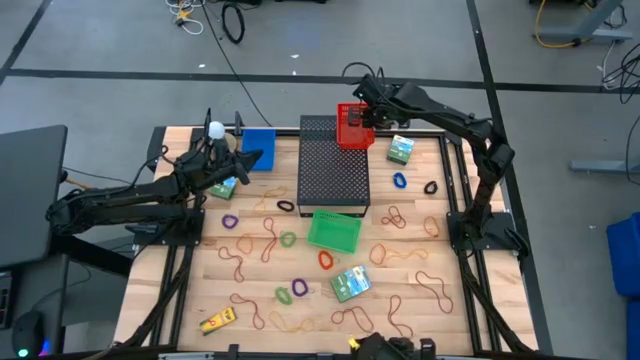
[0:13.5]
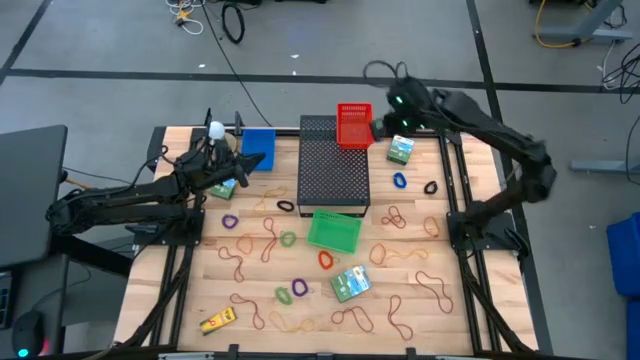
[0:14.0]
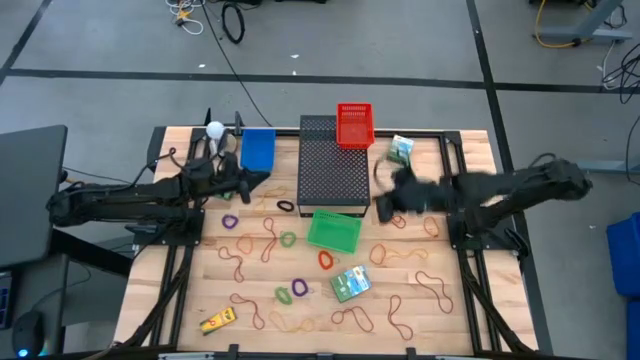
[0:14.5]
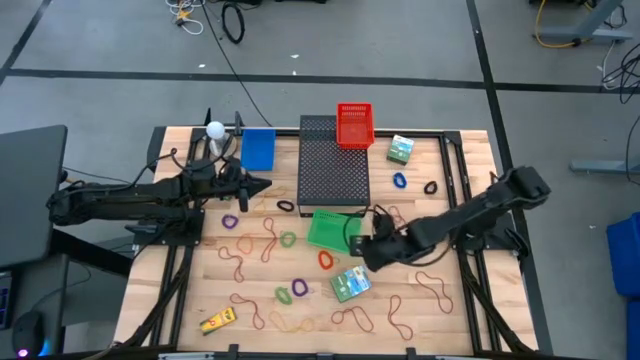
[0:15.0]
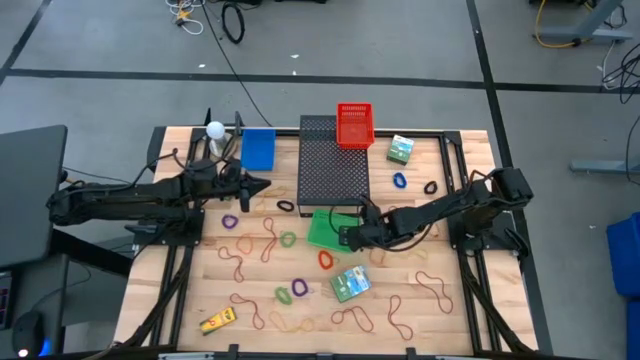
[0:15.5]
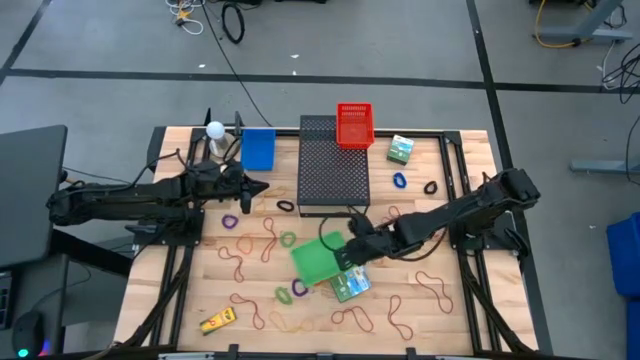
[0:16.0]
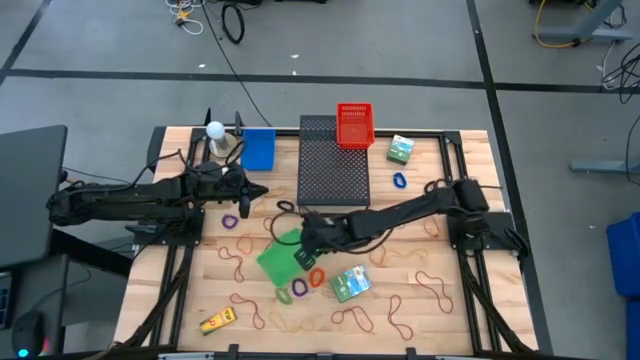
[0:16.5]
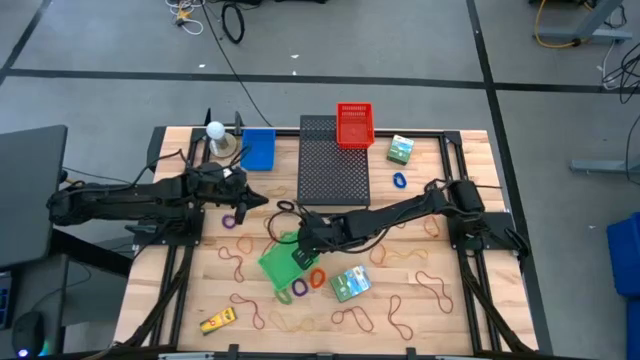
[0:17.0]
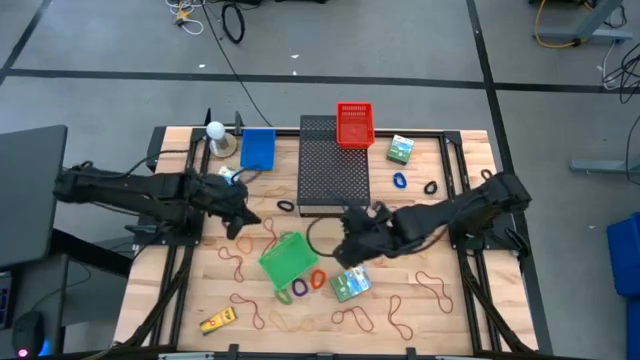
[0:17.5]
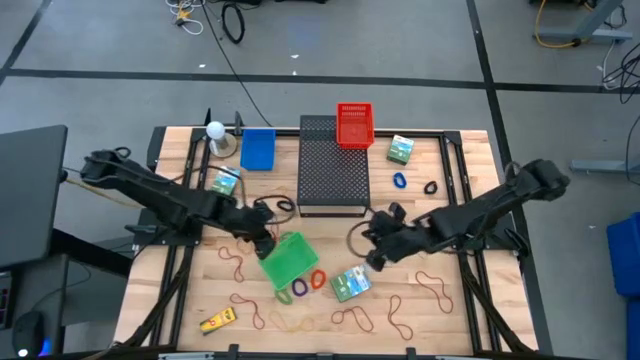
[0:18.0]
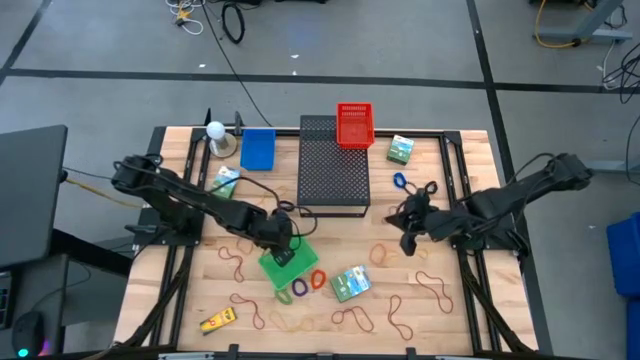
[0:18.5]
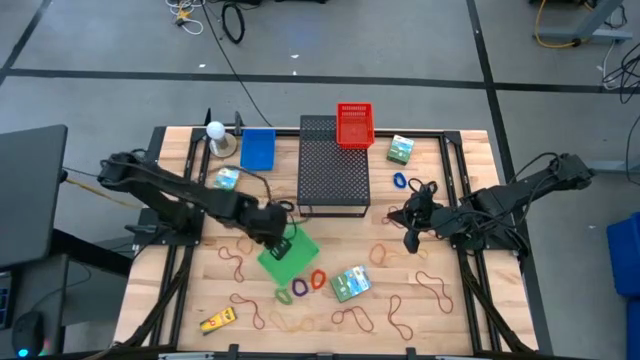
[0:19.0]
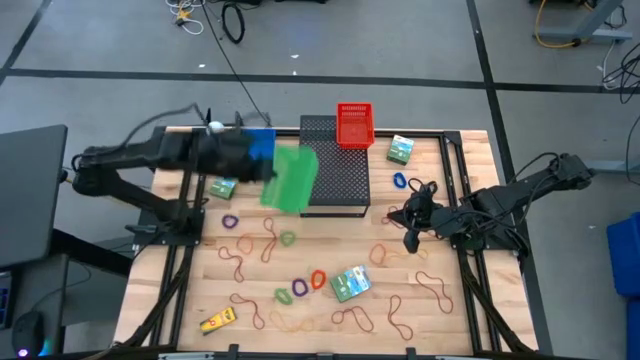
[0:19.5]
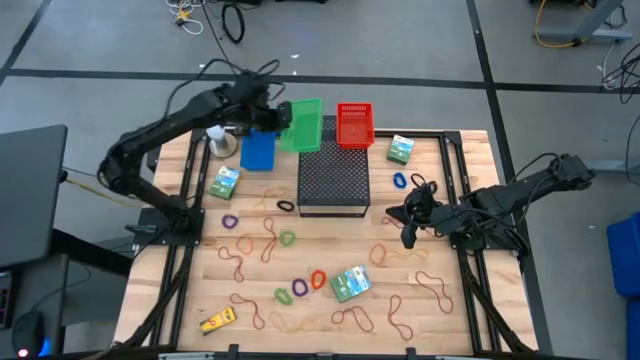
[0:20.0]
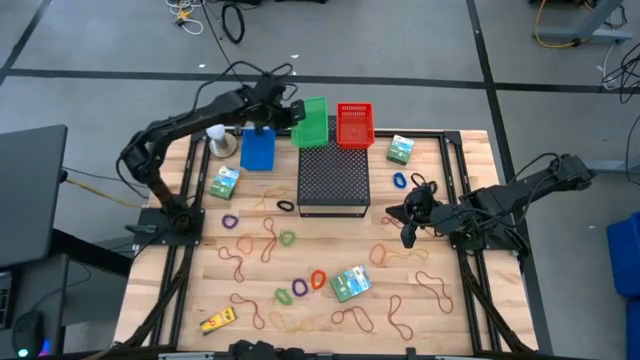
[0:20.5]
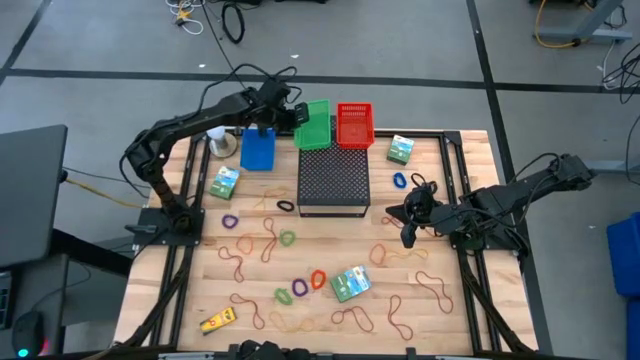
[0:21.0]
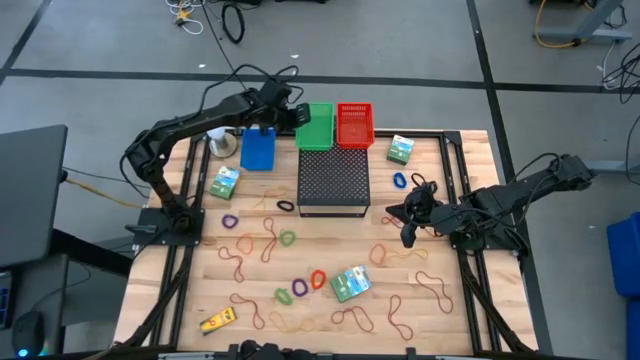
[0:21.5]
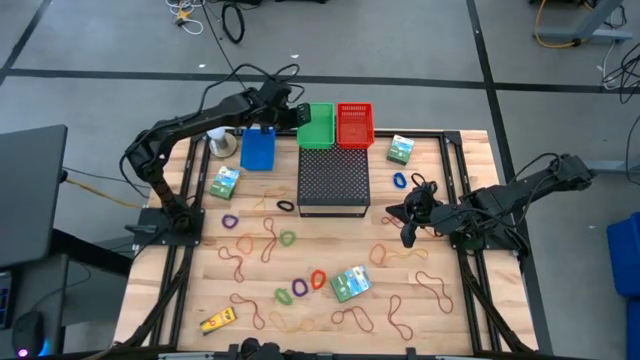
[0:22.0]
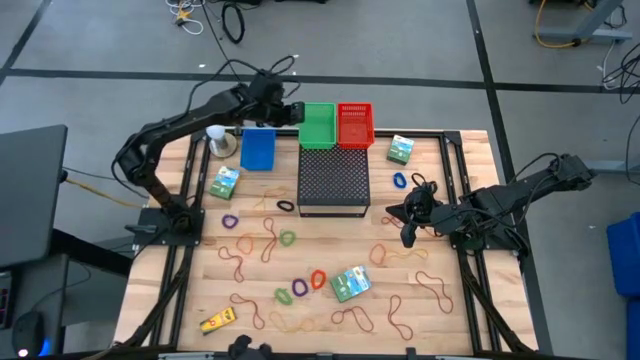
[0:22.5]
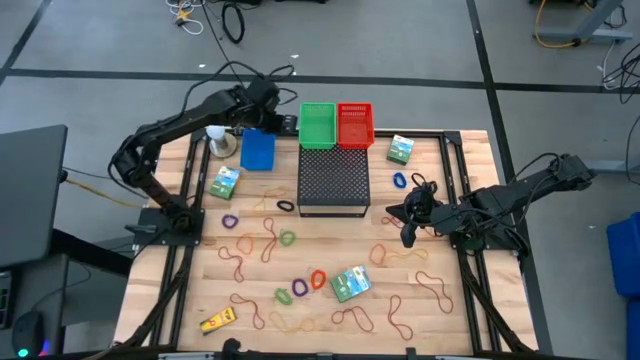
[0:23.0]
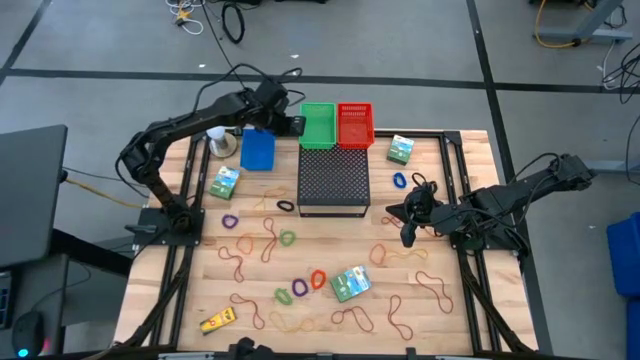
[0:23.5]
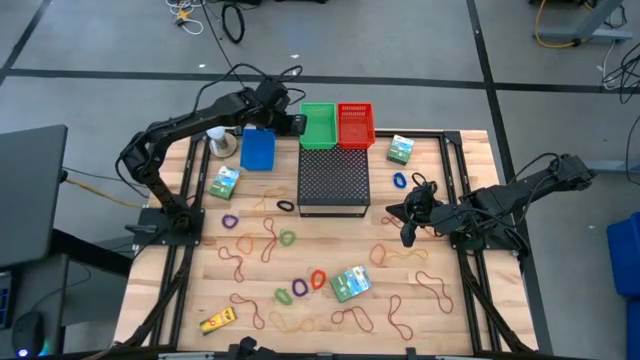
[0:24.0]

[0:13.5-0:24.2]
Task: Pick & Place Office Desk Supplies
Put the green bin on the shelf

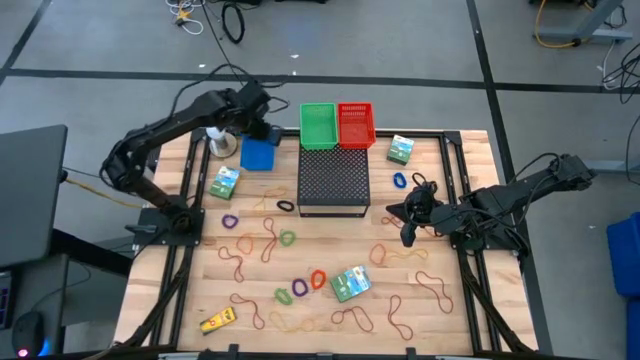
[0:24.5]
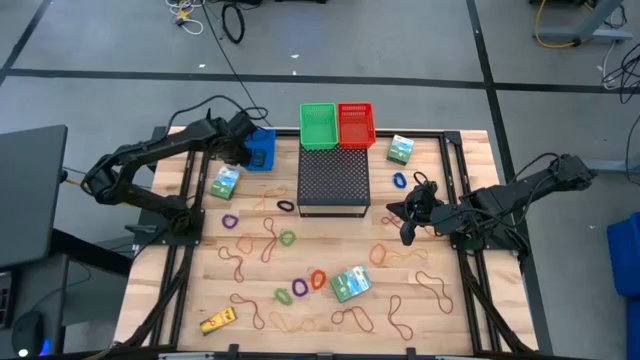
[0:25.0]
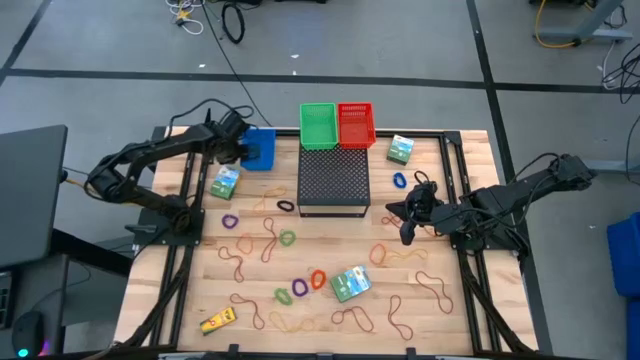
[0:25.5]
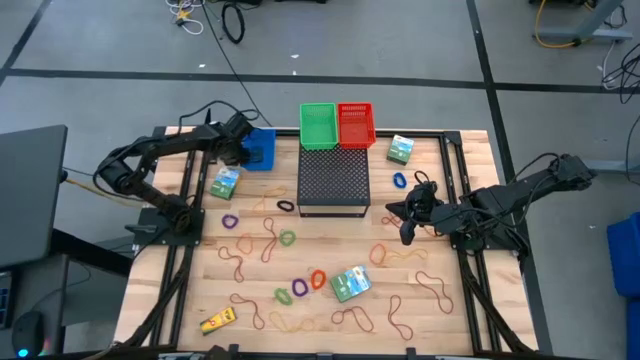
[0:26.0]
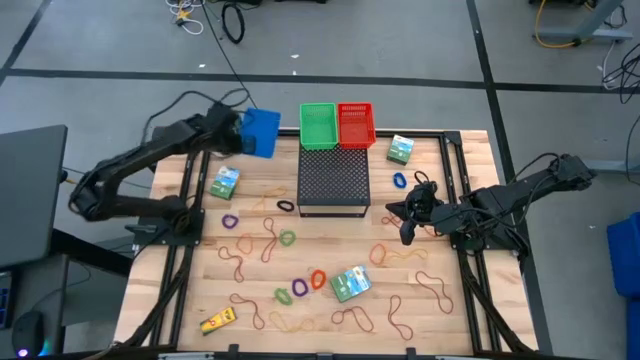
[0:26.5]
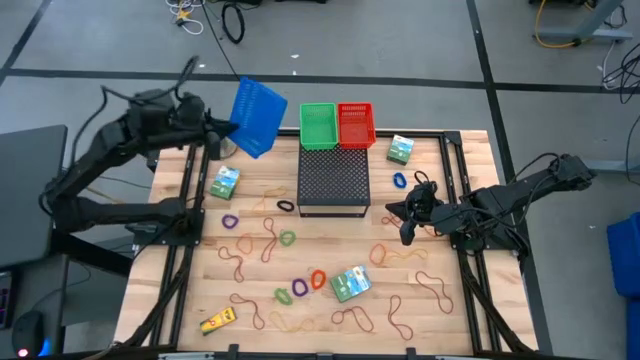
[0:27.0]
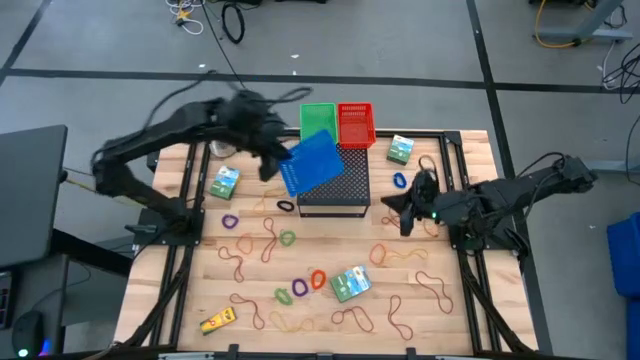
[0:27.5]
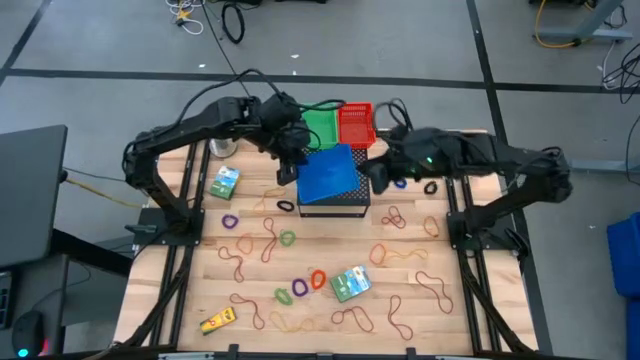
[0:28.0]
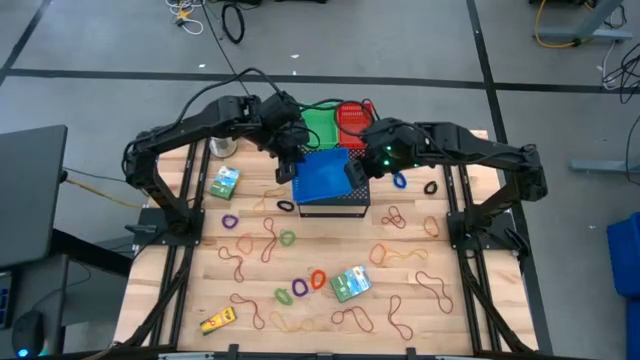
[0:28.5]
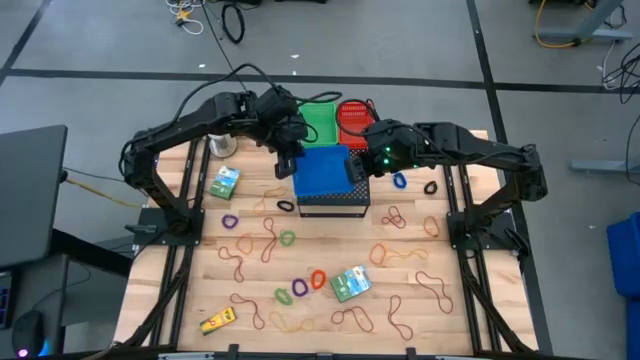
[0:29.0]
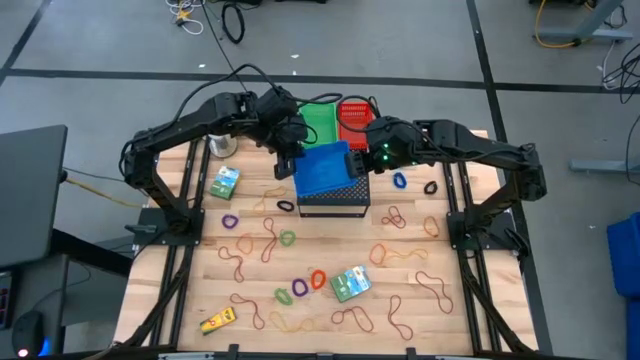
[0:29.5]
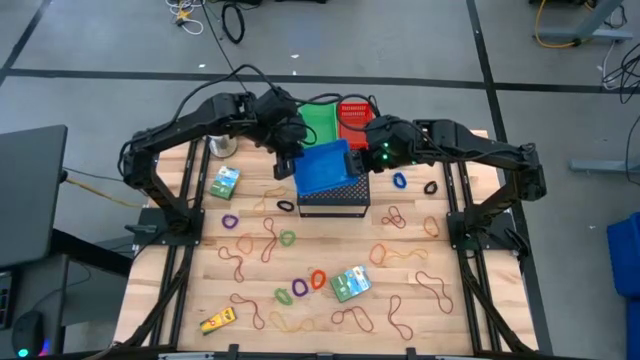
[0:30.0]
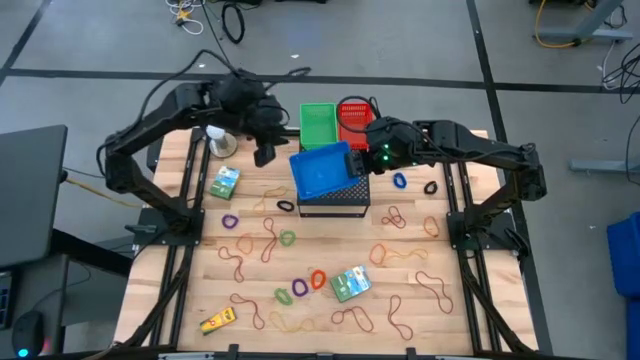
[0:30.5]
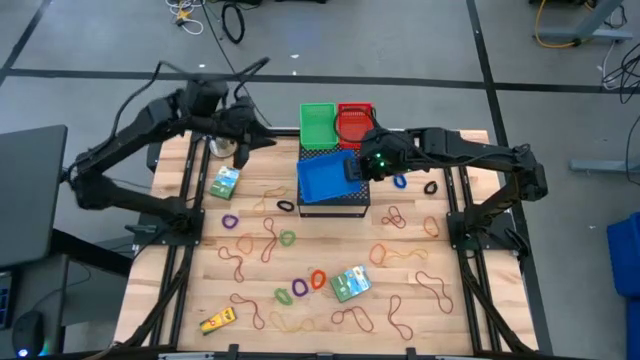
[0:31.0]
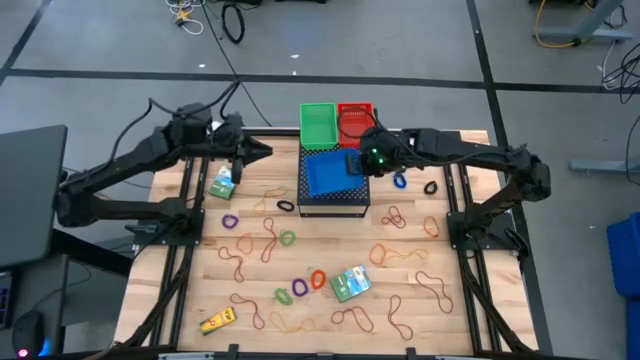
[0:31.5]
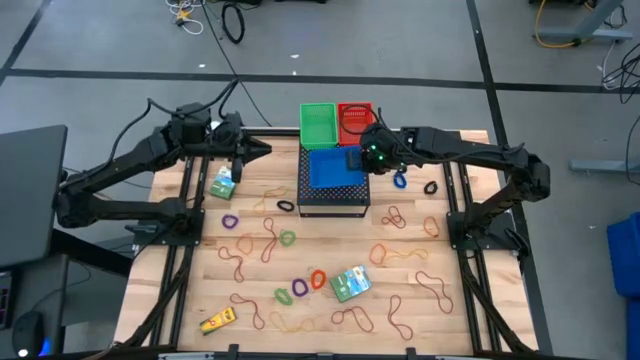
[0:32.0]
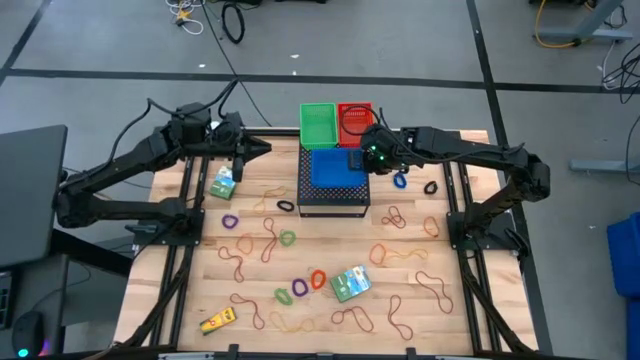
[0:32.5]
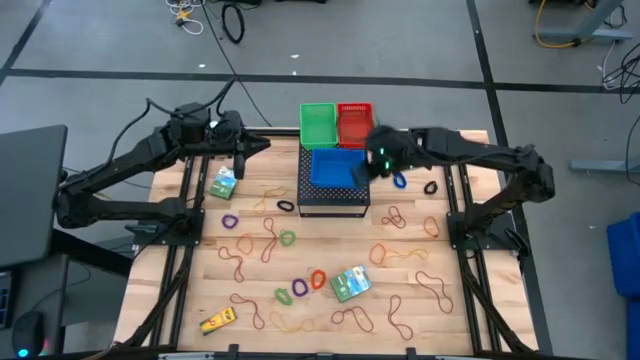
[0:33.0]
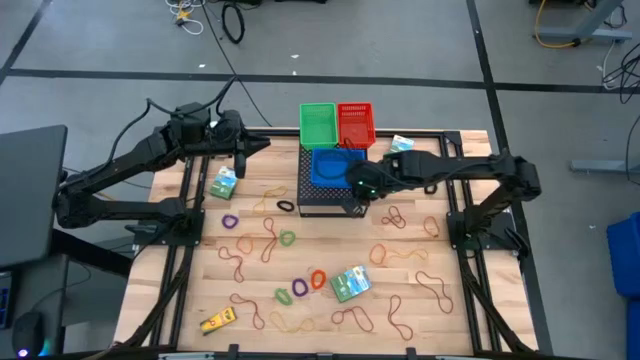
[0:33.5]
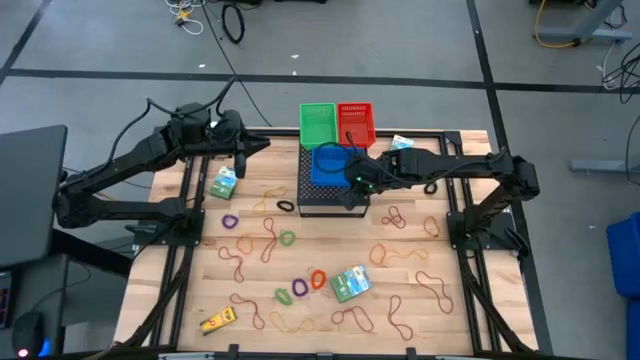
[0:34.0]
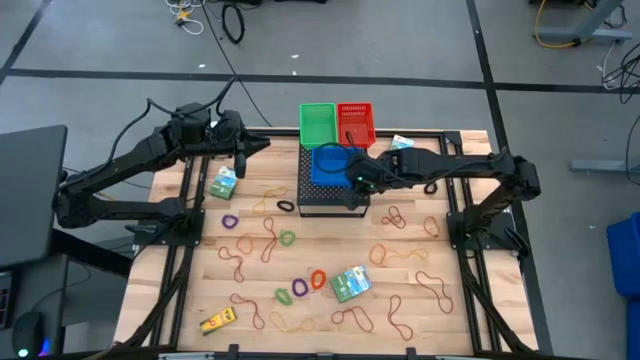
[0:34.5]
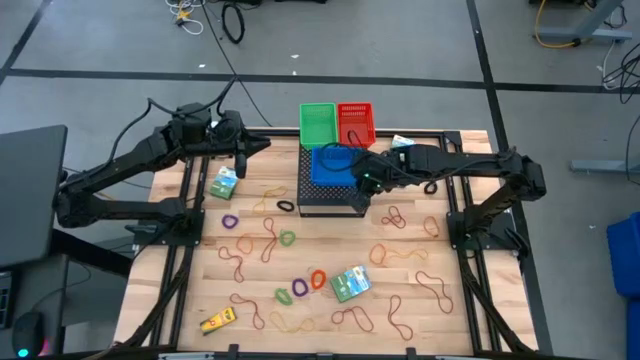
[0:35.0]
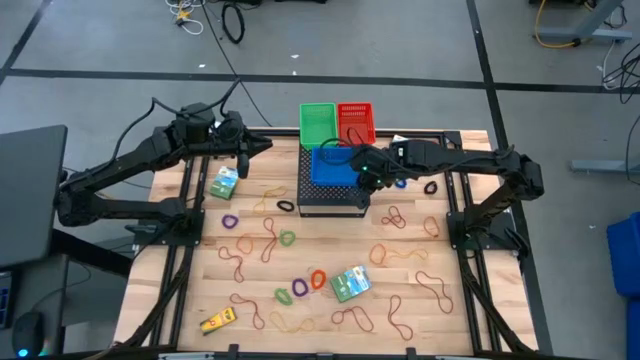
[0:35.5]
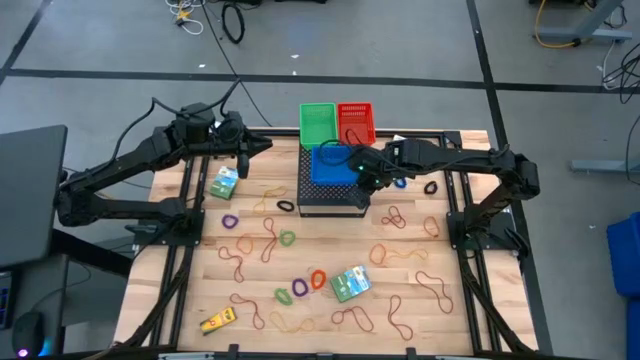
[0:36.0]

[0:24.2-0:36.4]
Put the blue bin on the shelf
